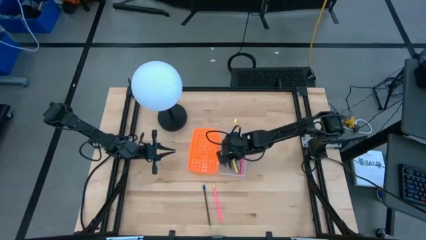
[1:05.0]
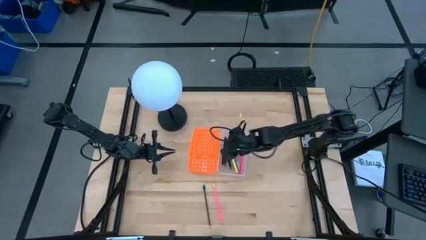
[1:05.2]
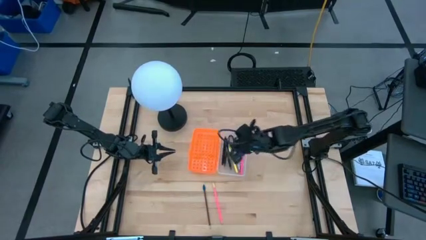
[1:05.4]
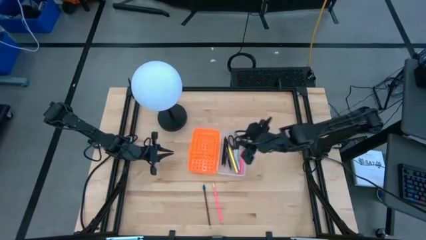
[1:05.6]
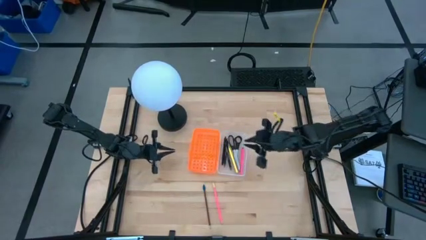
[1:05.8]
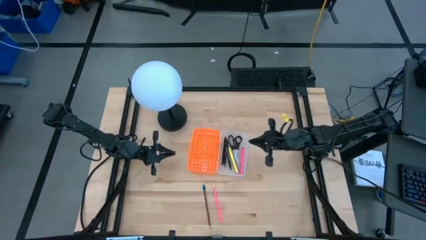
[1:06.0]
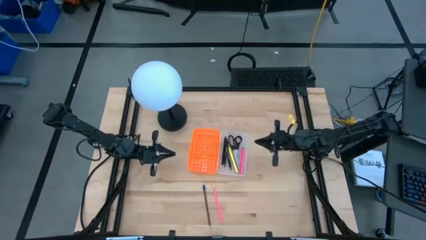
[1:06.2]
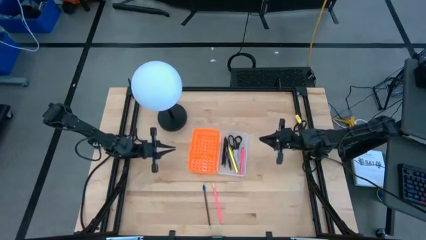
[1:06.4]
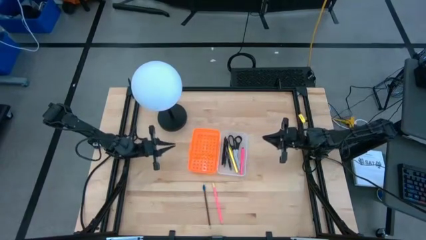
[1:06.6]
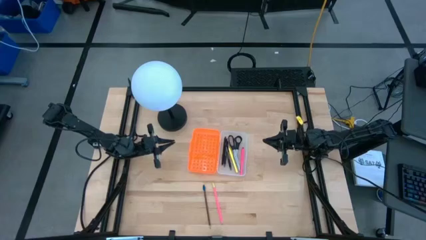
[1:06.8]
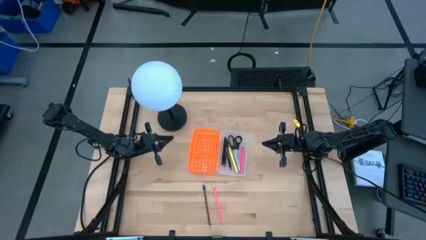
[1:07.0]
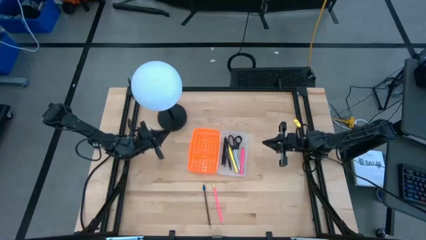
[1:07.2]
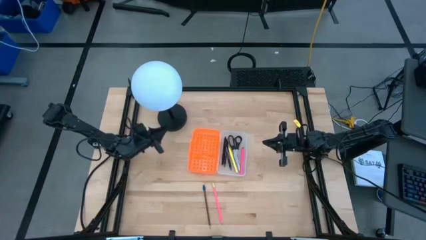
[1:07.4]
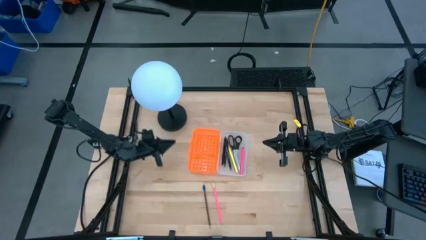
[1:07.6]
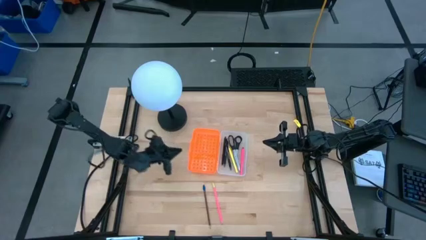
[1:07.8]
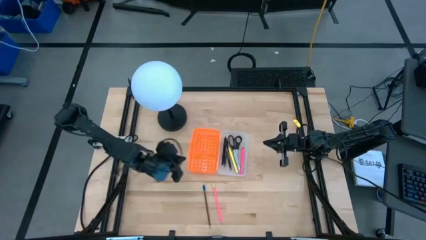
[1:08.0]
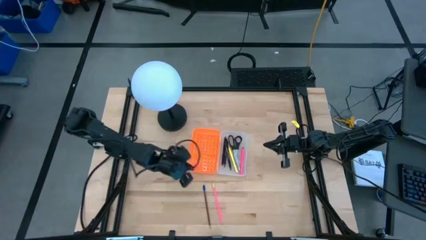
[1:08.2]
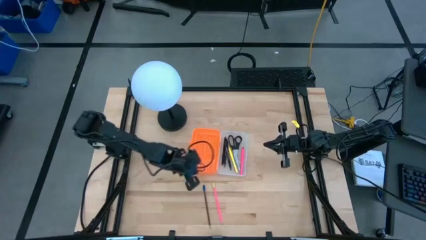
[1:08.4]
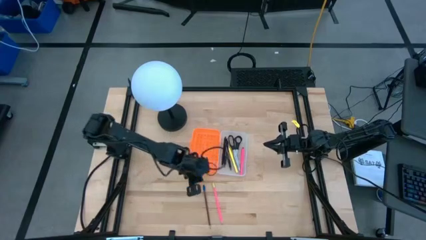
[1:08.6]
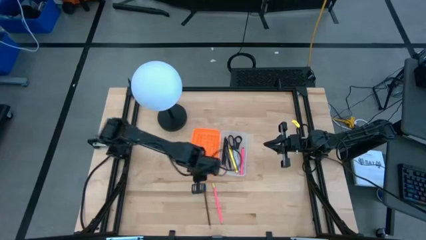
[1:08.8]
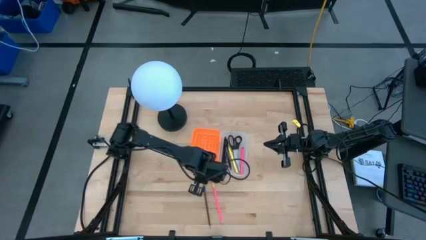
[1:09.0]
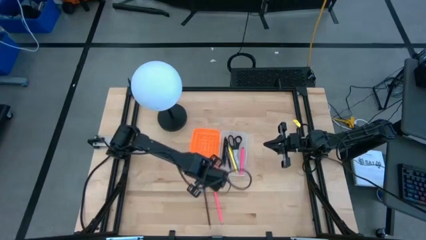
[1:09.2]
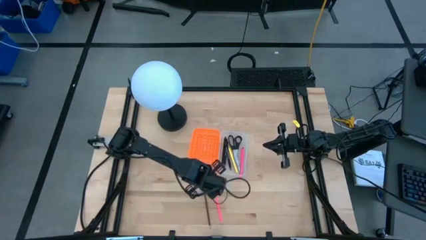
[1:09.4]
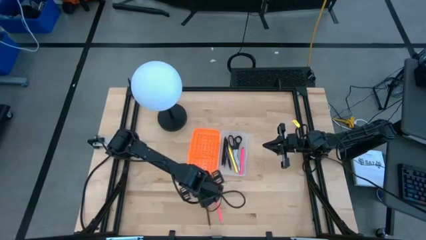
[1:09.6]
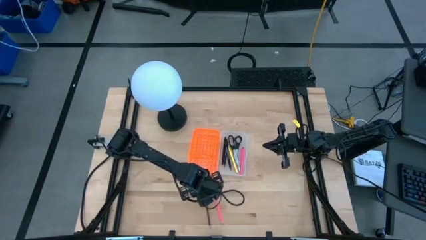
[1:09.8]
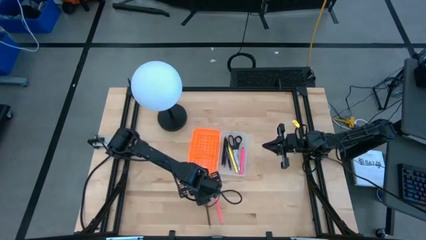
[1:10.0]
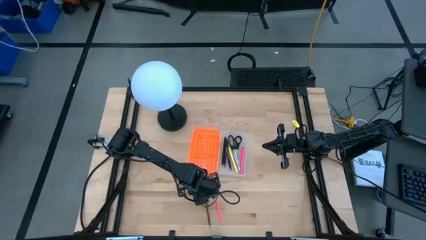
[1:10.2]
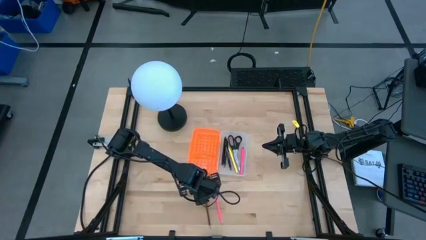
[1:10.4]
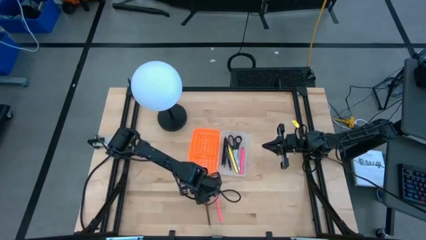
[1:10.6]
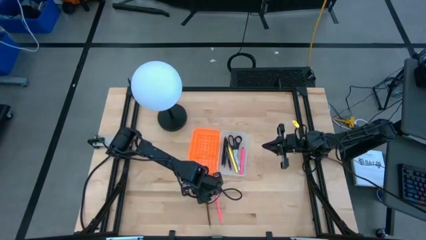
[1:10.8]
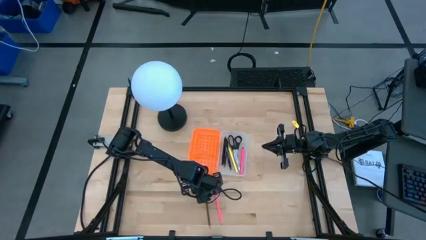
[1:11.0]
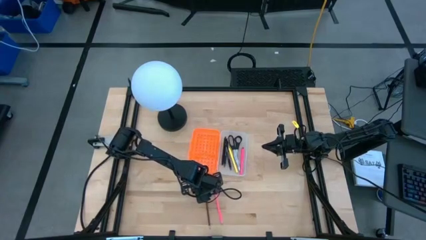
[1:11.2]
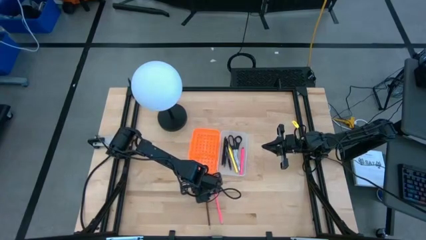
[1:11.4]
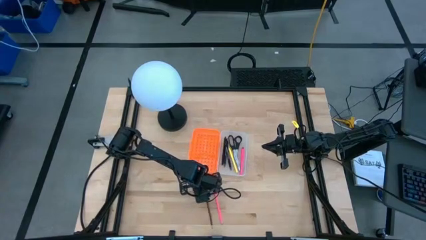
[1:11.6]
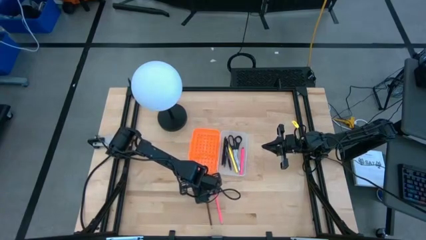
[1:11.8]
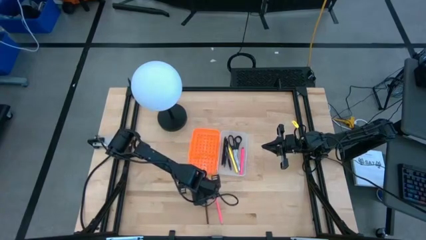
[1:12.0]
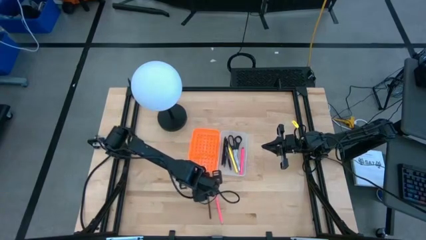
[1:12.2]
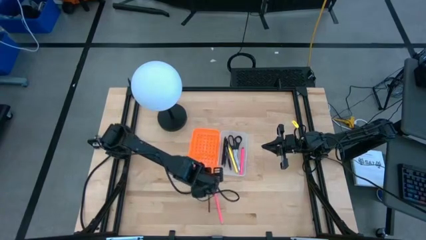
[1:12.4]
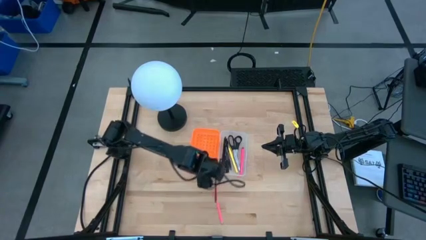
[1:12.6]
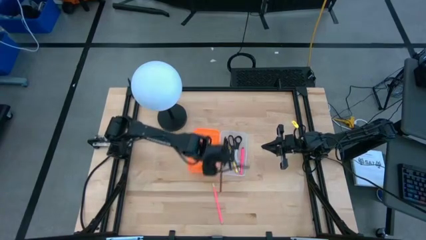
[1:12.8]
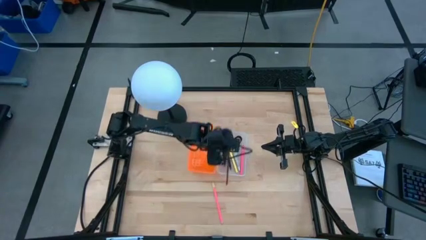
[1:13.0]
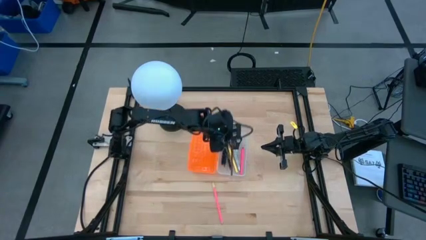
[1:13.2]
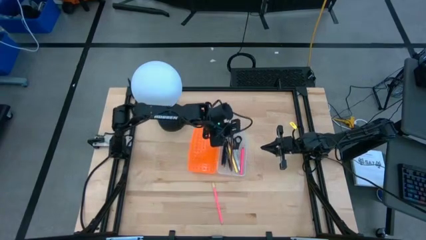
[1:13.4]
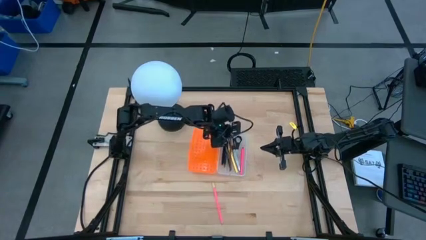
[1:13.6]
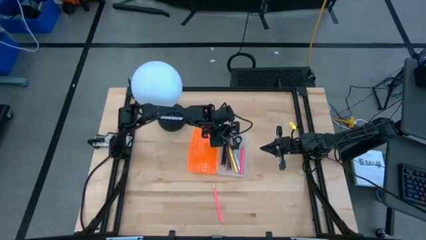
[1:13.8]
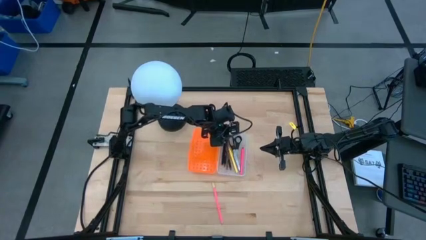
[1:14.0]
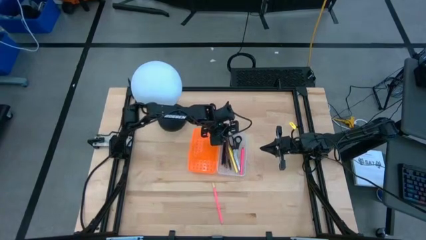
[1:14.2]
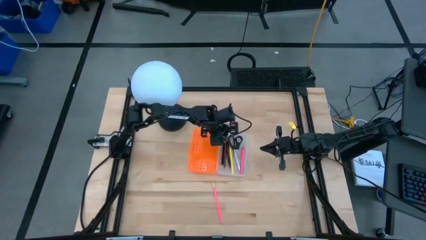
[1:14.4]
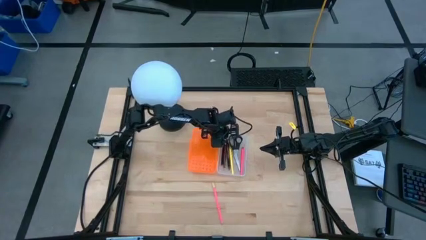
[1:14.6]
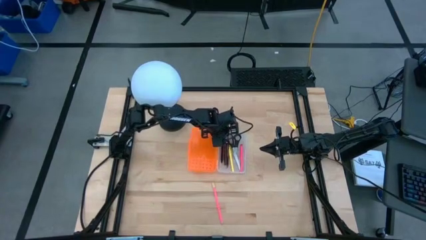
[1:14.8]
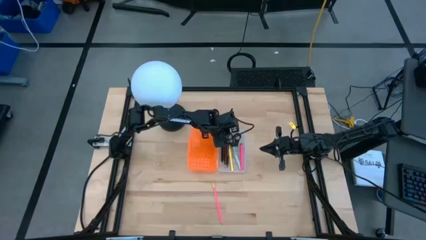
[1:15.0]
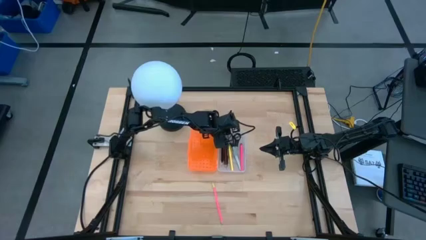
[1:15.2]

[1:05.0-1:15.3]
Task: Pick & place school supplies into a supply box
Put the brown pencil into the orange supply box

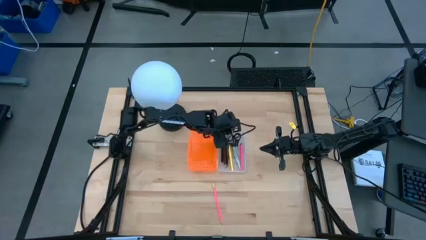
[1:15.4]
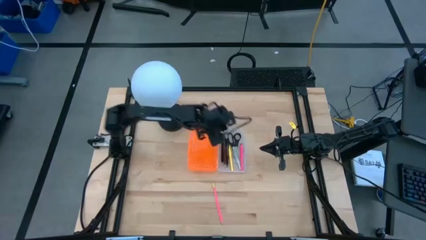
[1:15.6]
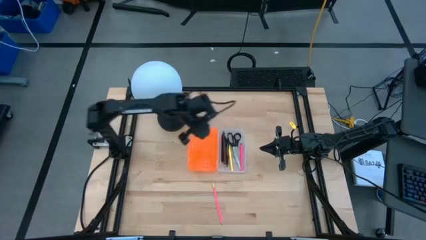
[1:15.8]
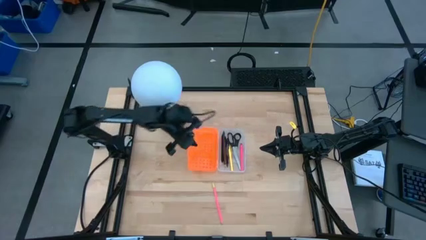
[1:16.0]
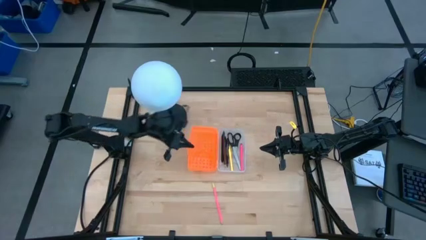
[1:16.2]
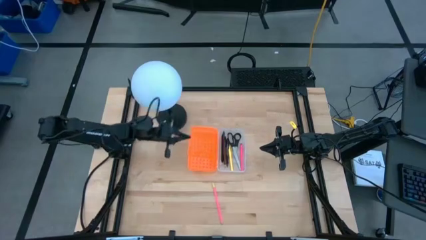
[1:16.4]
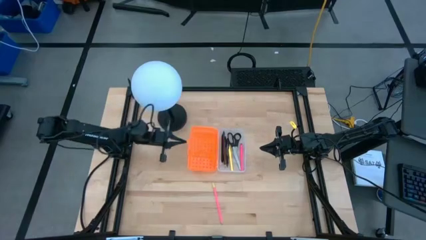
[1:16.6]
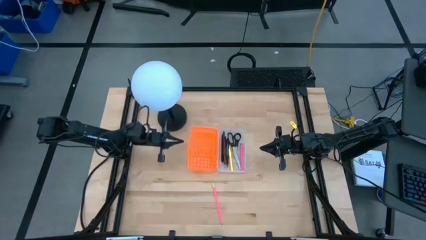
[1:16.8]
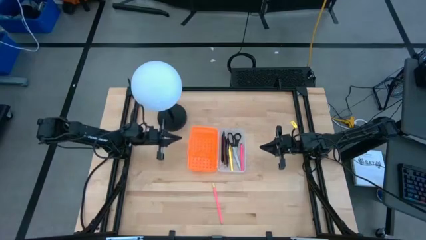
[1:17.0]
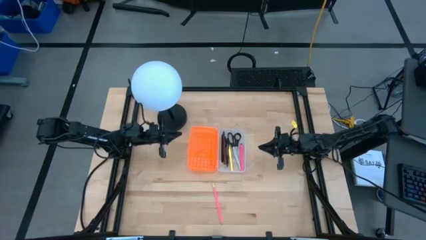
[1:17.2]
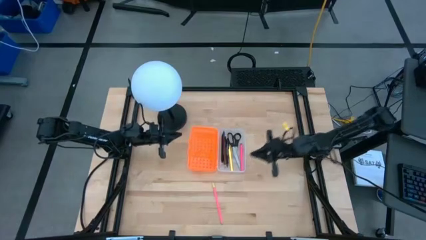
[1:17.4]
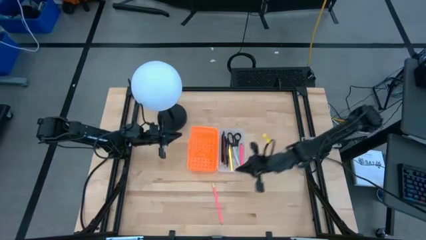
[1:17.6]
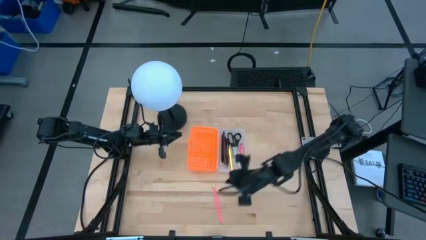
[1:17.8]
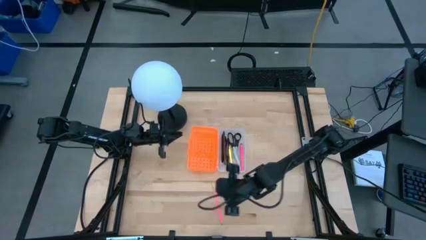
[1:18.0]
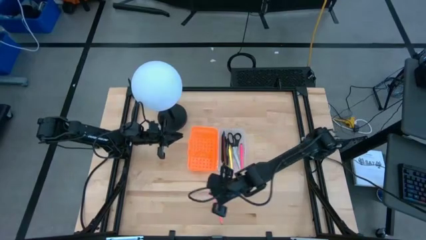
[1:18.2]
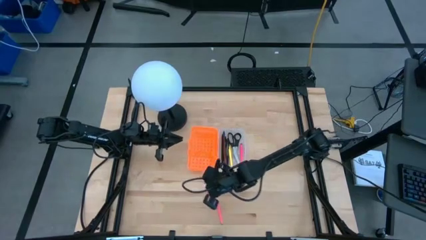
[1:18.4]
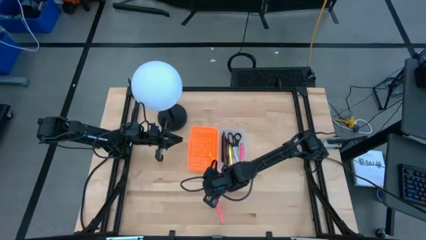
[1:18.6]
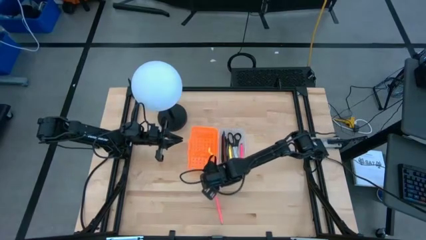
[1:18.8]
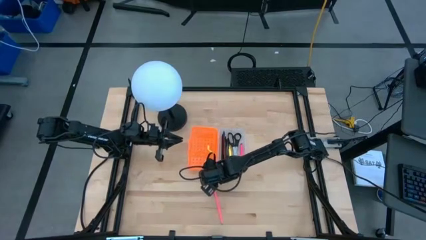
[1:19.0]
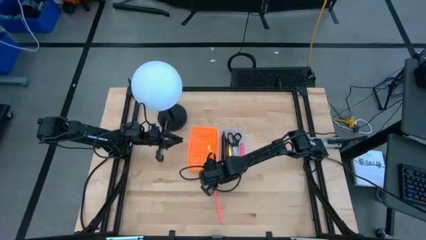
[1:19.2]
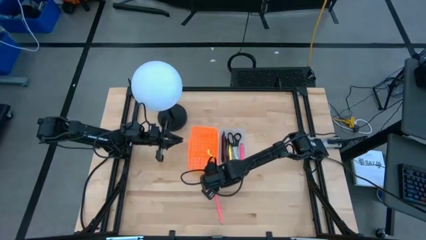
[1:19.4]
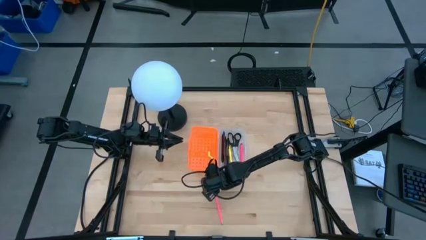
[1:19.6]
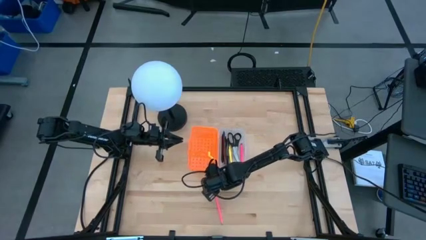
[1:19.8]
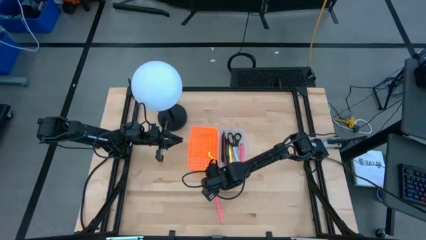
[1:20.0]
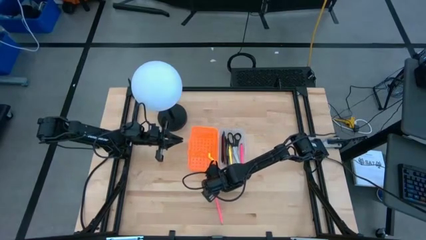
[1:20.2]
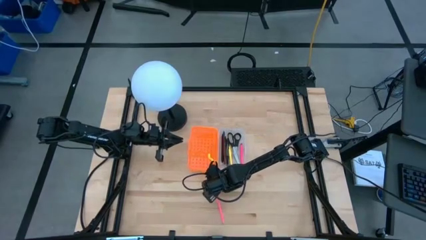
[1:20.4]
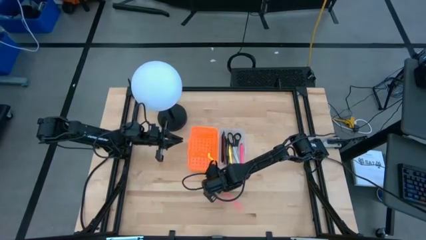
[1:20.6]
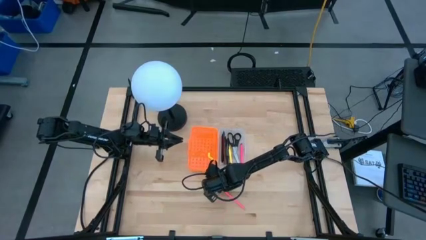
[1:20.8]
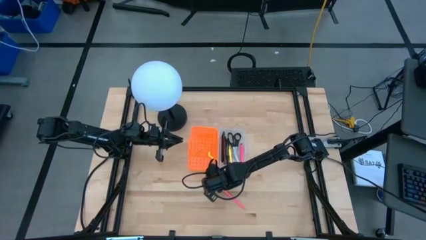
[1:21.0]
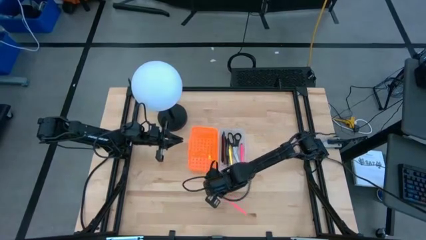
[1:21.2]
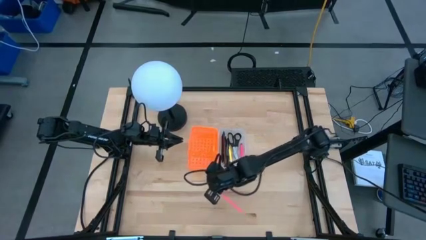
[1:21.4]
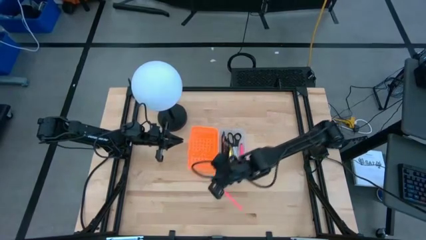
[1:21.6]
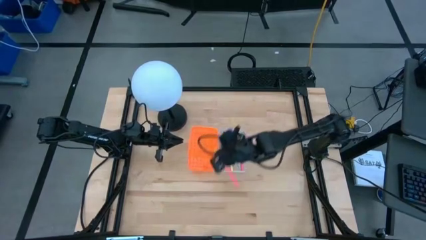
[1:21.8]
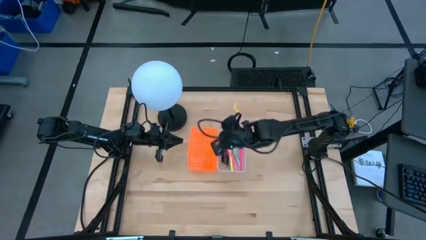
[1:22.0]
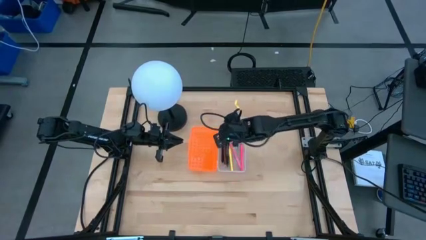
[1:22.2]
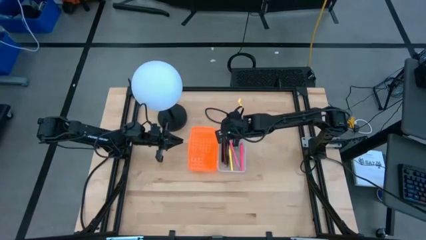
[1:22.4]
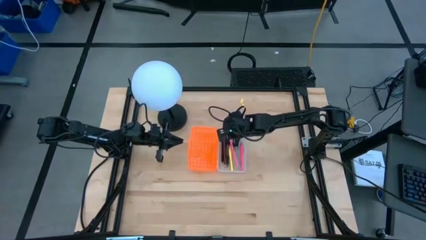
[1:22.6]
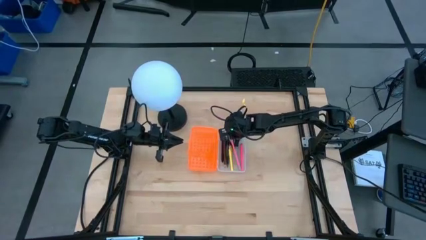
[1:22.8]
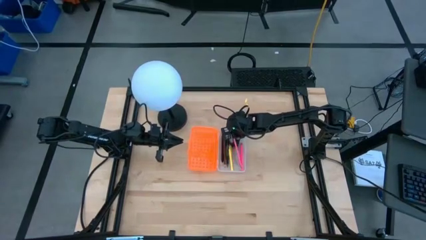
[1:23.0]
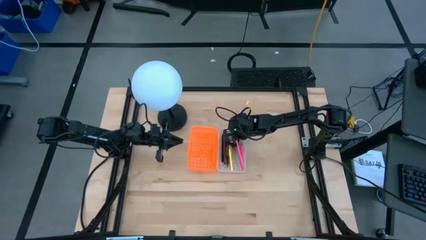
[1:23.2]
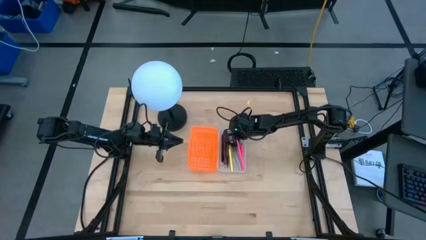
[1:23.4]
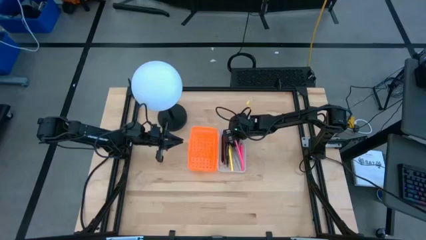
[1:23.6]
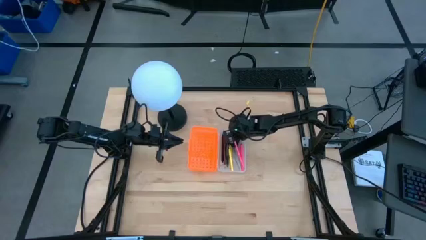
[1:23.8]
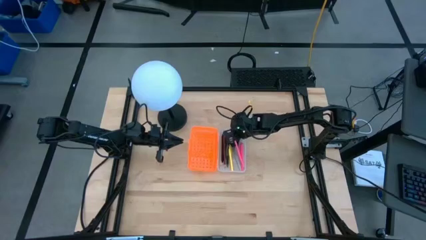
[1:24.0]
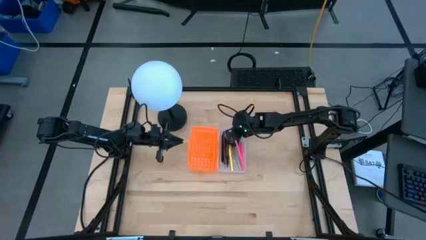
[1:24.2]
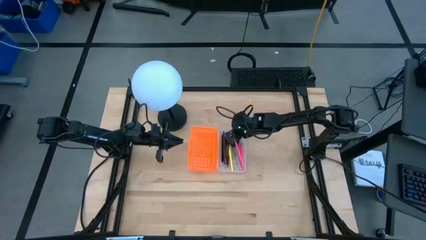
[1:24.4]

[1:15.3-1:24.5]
Put the pink pencil into the orange supply box
